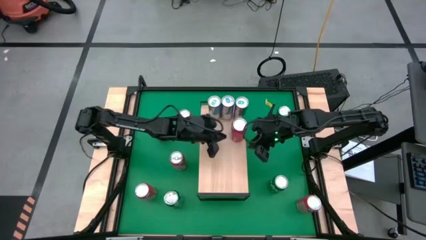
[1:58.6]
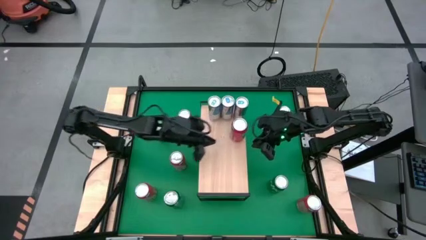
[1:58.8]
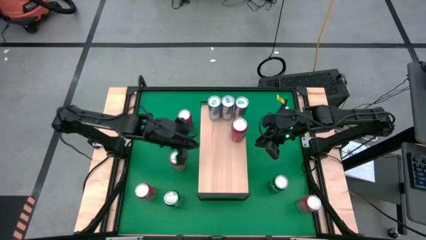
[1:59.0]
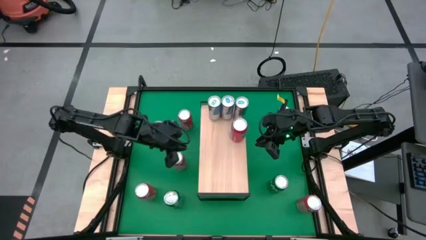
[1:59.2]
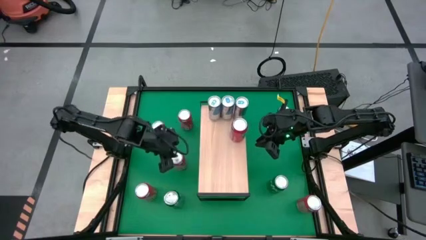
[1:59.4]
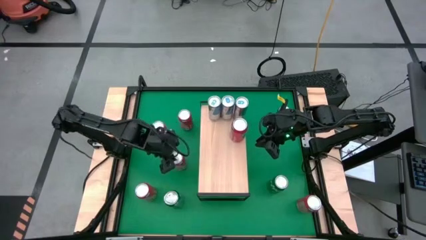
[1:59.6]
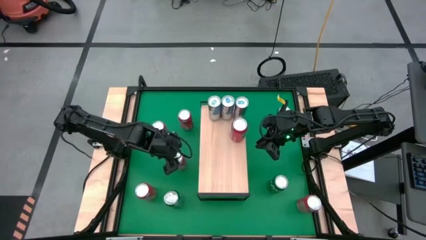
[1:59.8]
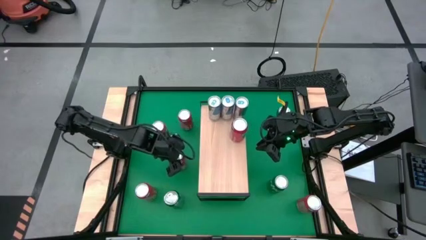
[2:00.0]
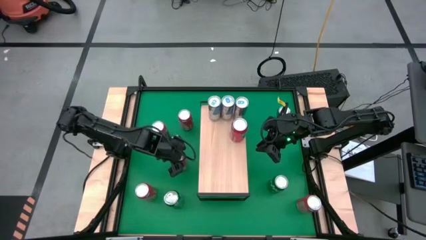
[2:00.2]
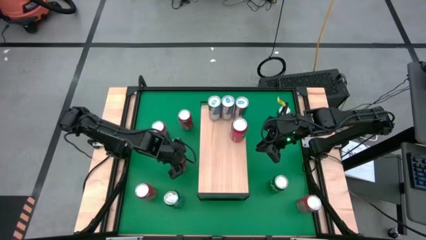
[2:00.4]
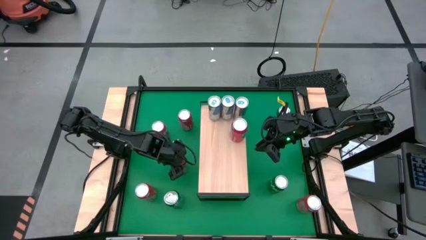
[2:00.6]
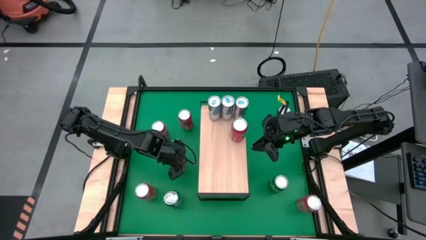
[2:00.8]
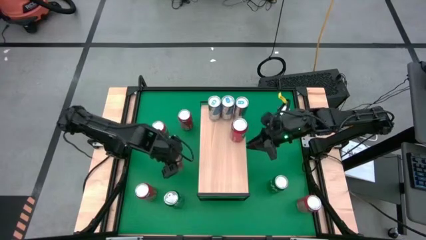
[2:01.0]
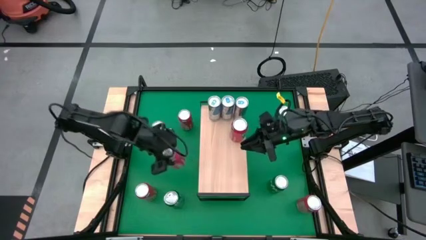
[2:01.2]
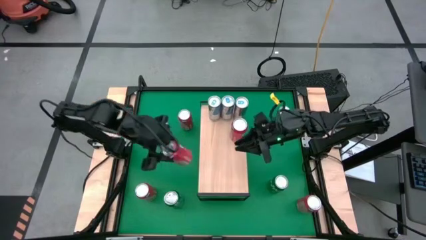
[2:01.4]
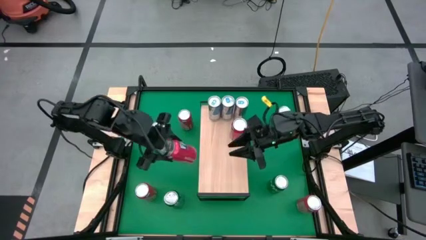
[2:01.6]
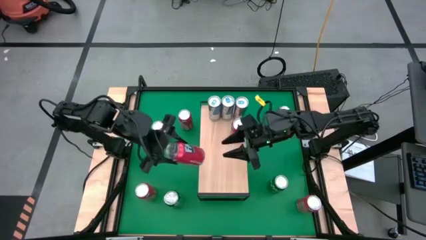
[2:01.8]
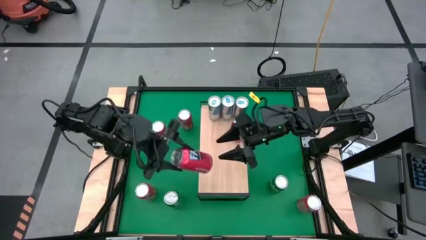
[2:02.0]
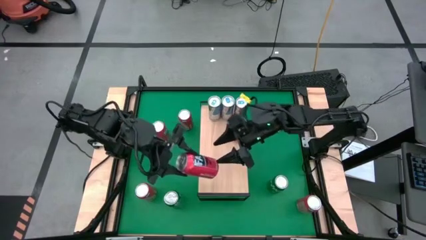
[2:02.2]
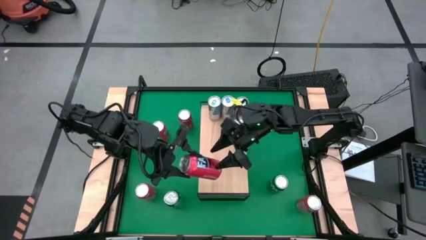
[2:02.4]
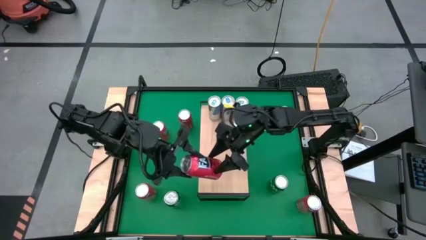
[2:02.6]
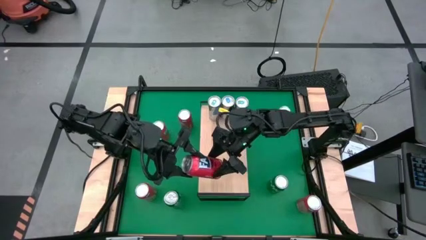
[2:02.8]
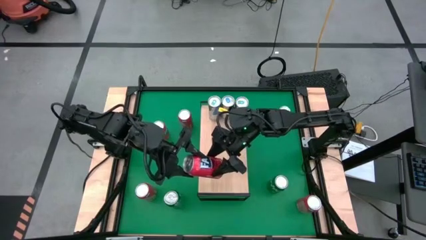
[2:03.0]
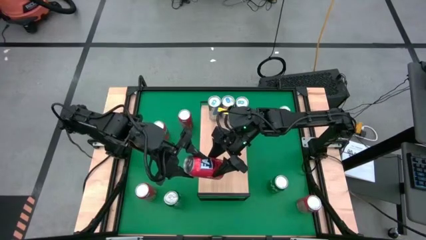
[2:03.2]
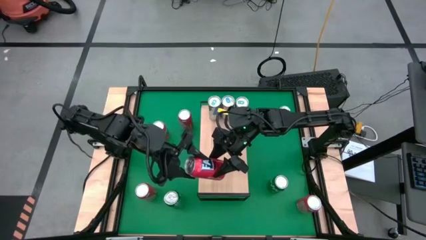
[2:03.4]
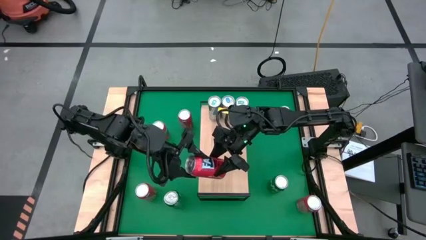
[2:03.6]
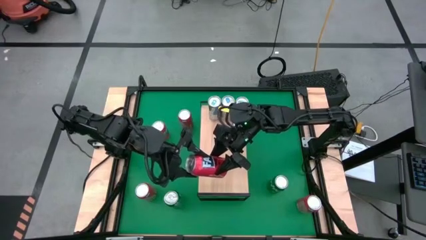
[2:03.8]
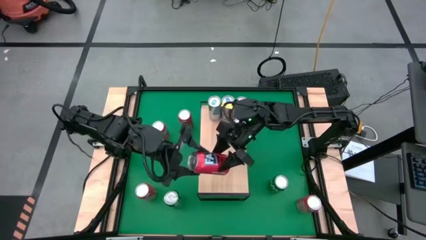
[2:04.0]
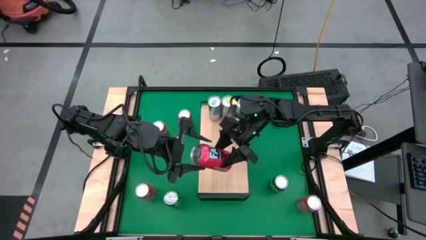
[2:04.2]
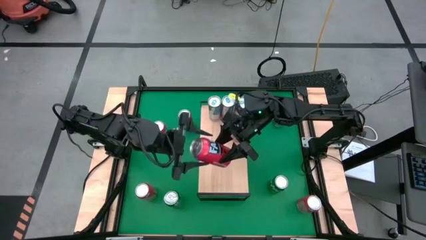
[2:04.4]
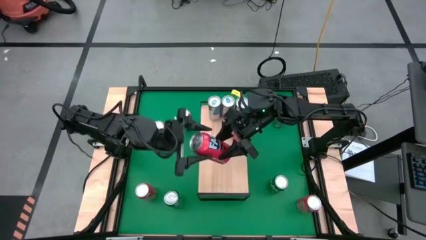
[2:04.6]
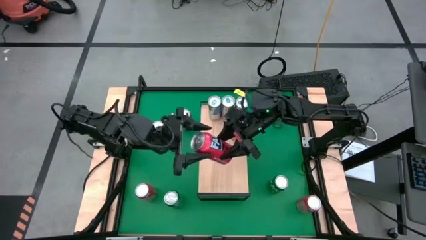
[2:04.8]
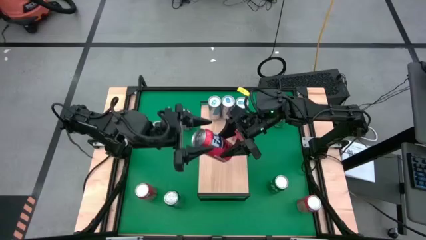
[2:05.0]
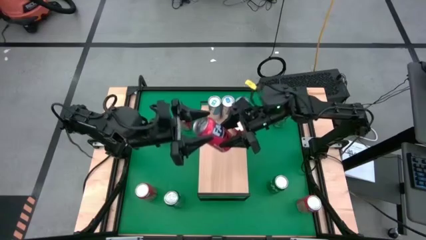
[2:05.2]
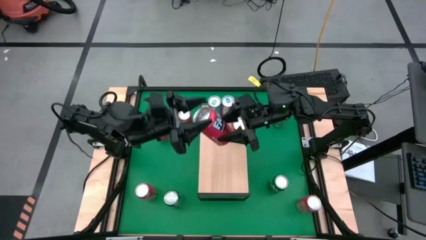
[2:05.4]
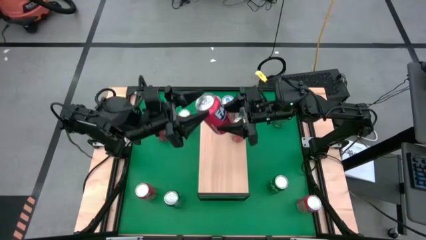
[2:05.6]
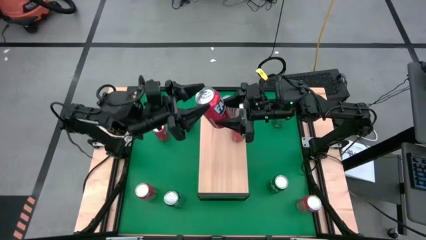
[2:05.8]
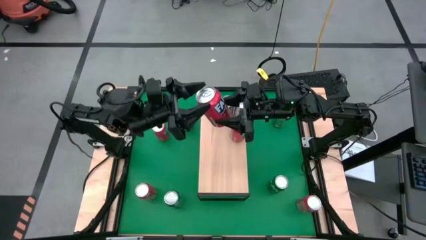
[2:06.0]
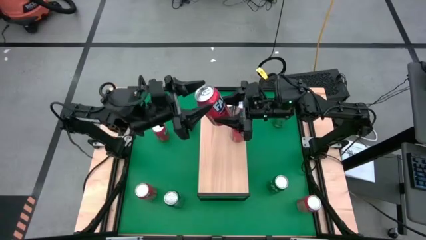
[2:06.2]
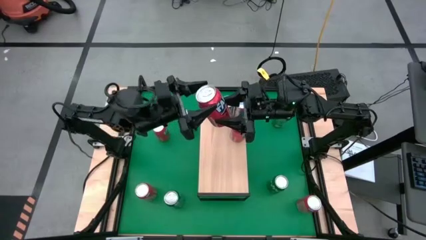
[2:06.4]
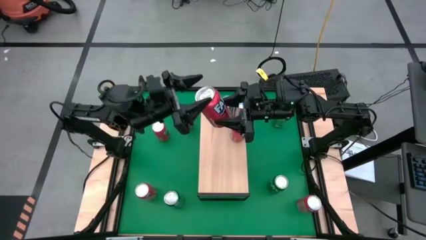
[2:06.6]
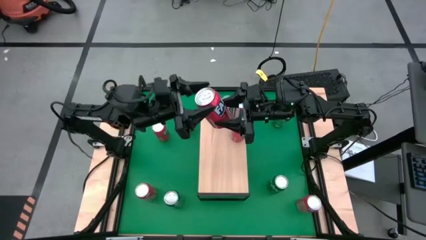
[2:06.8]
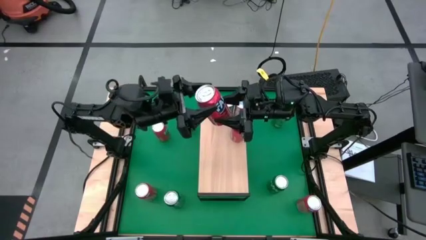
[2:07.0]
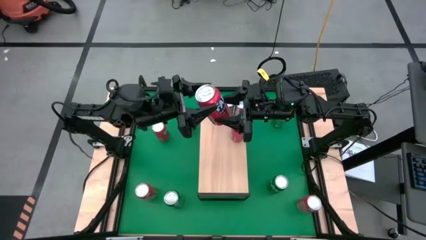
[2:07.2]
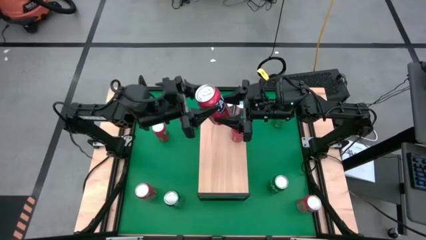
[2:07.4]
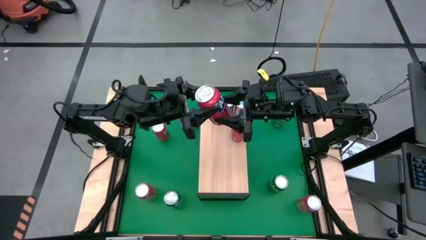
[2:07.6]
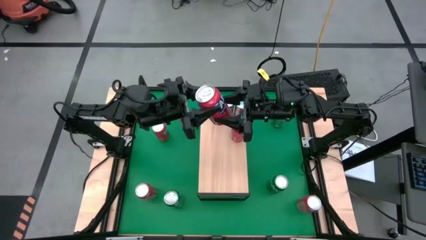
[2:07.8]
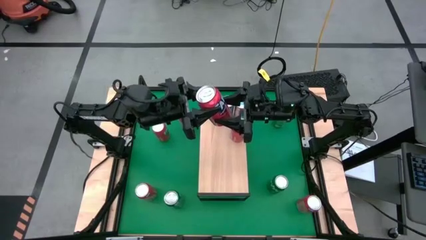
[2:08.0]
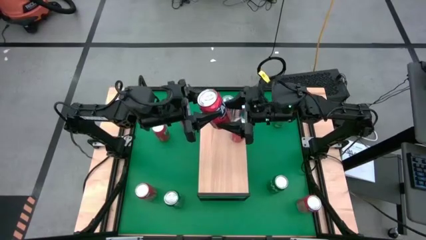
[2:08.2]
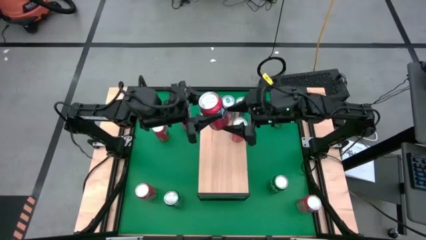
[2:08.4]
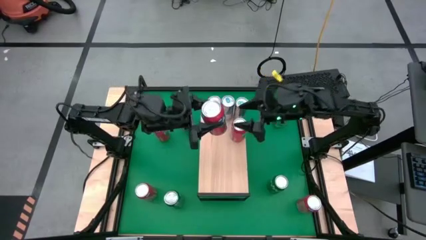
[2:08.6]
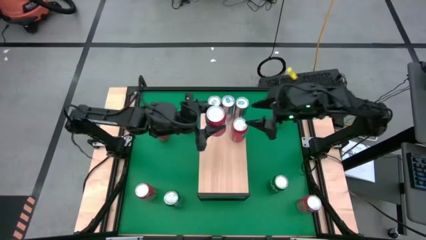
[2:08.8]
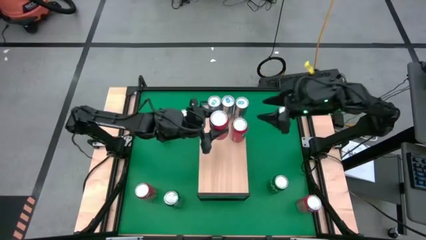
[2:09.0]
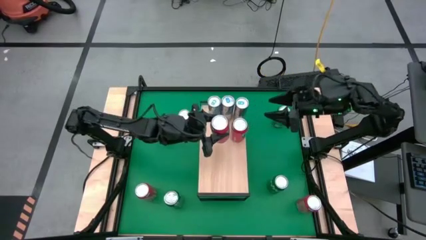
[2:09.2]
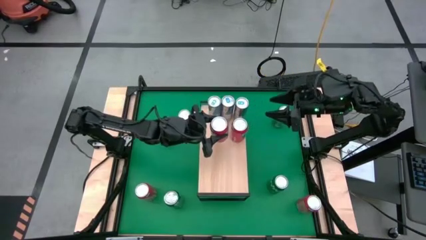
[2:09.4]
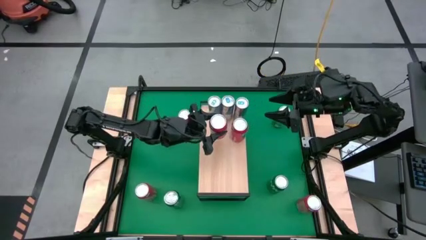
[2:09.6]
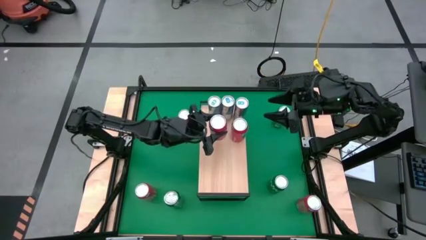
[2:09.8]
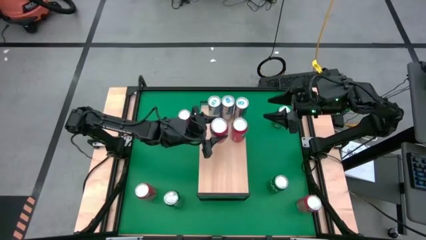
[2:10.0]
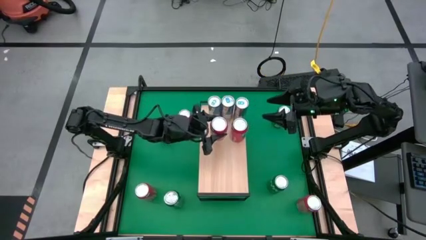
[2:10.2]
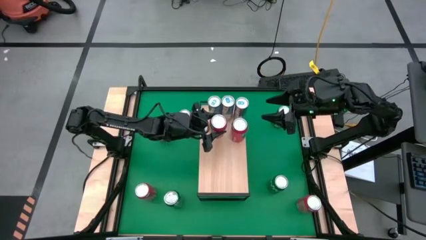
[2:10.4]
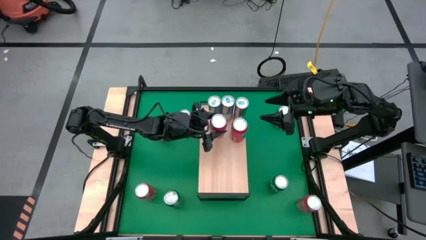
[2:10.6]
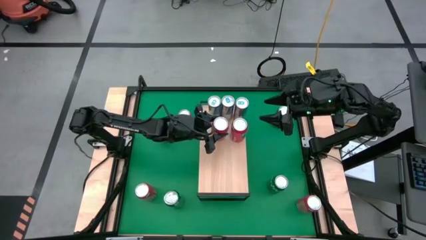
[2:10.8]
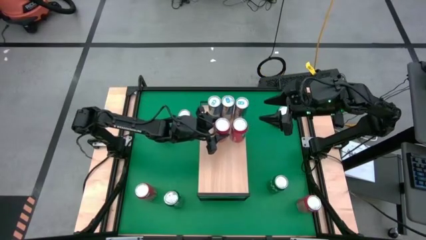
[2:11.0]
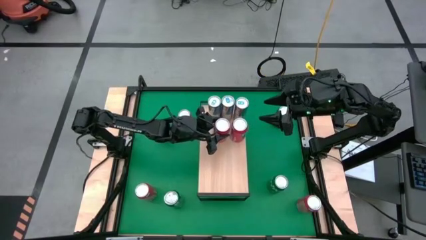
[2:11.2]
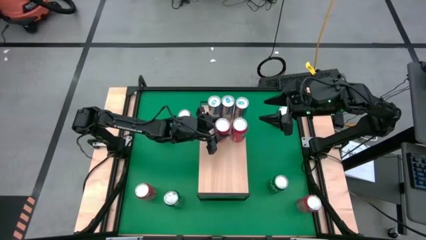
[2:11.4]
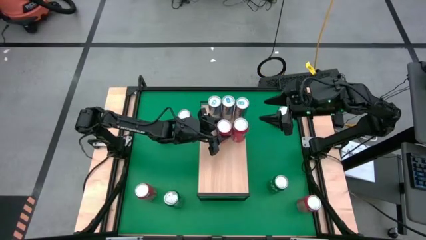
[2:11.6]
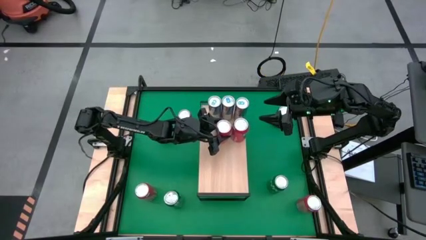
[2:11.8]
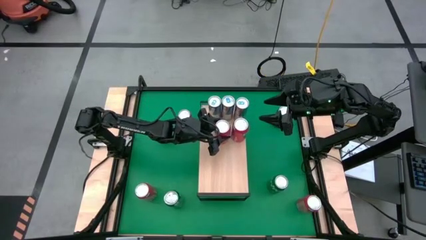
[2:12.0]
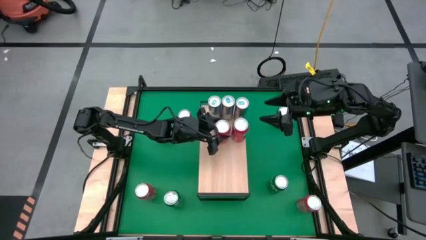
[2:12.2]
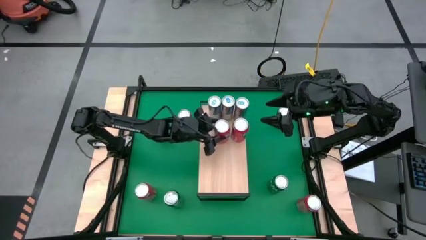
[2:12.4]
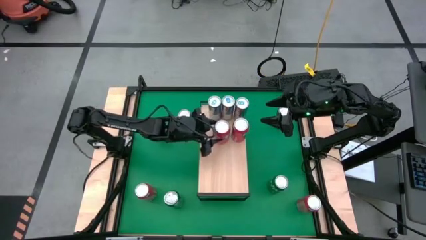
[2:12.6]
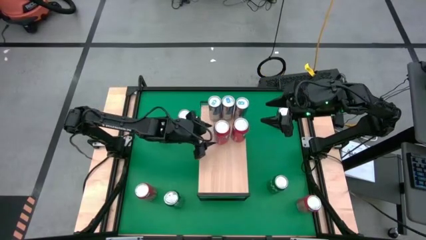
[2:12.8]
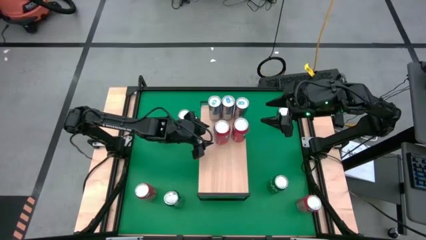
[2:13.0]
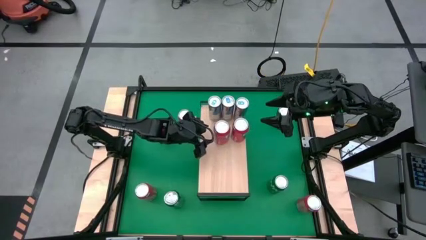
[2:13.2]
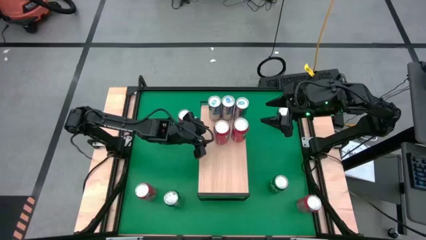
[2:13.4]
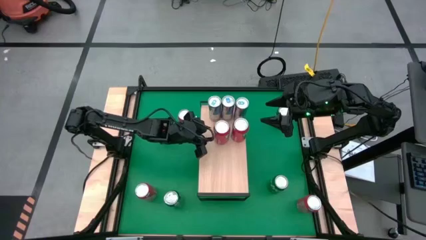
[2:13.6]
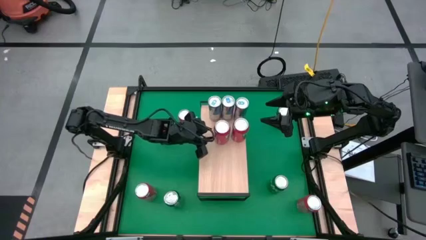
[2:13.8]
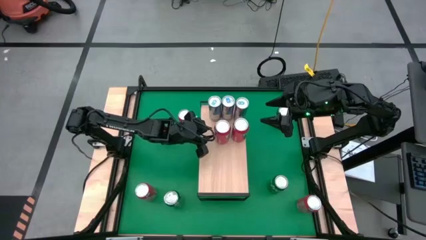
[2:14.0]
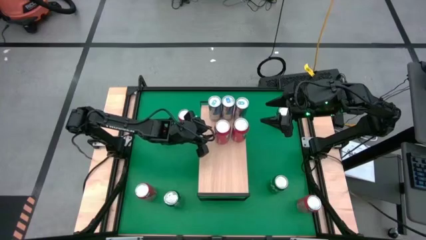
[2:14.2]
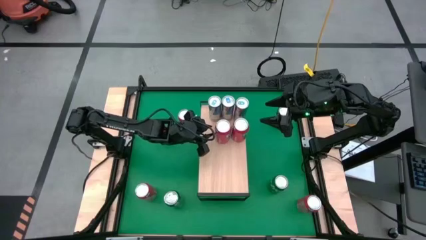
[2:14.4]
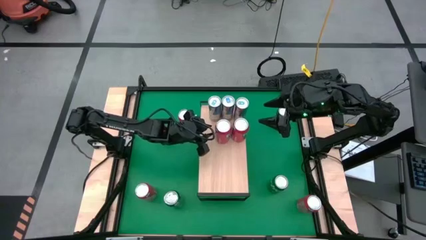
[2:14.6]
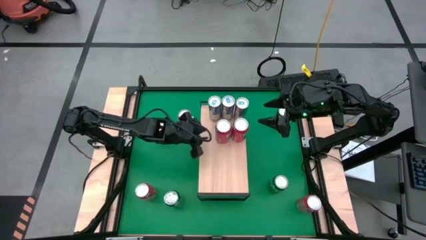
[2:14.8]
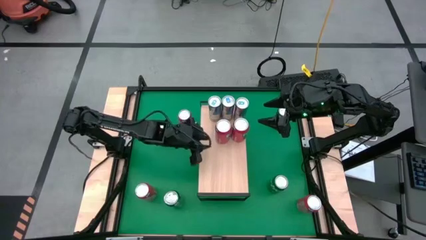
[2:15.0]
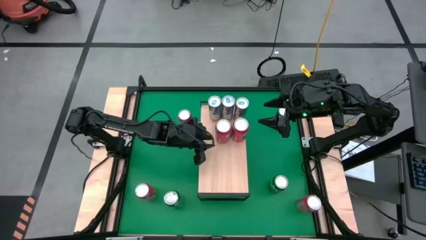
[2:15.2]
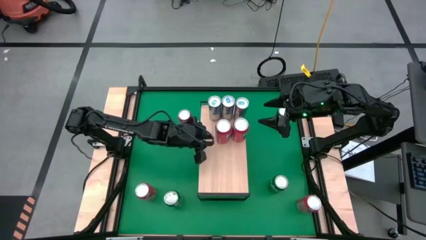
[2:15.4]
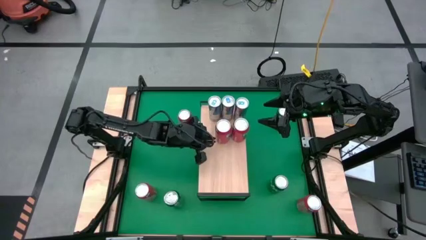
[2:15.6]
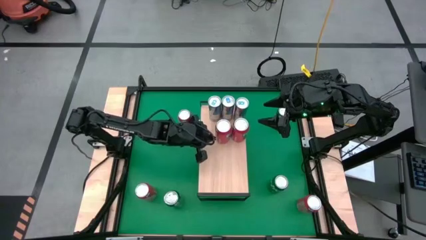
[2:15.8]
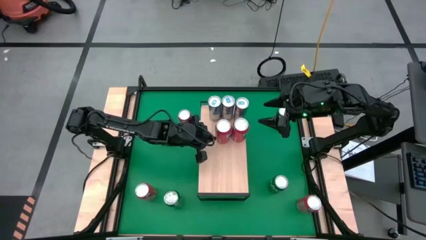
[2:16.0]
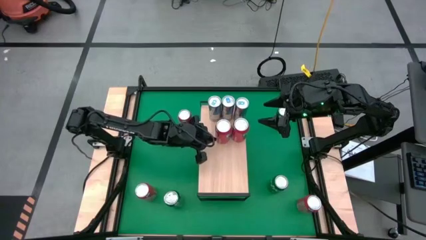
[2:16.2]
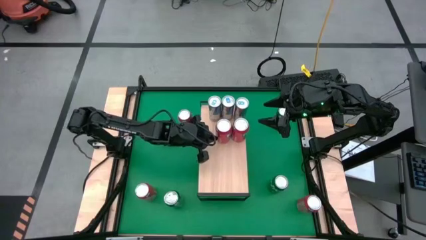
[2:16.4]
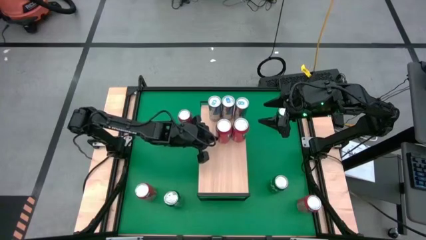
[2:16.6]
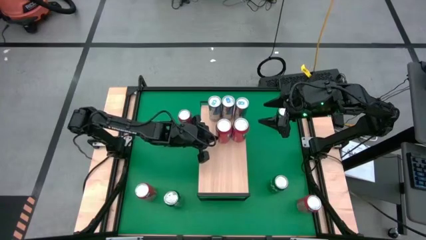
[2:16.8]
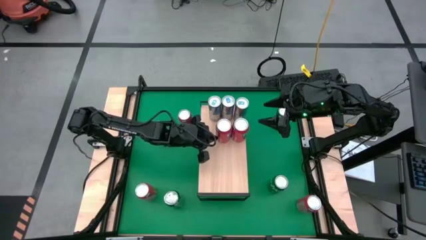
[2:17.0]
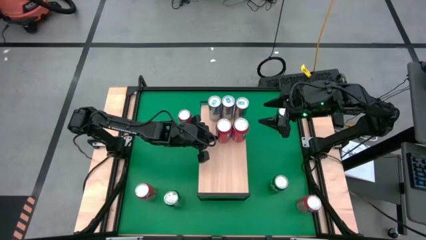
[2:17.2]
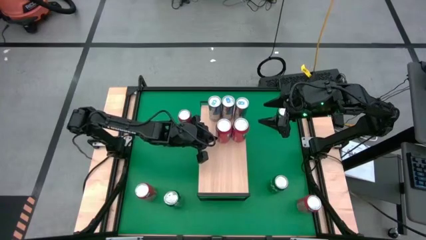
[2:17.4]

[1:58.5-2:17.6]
Task: Place canned beverage on shelf
Put the orange soda can on the shelf aligned with the other orange soda can
